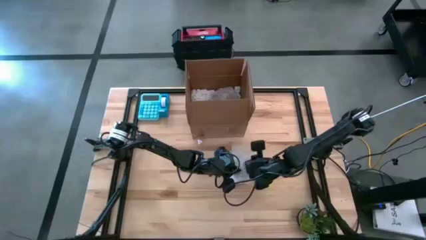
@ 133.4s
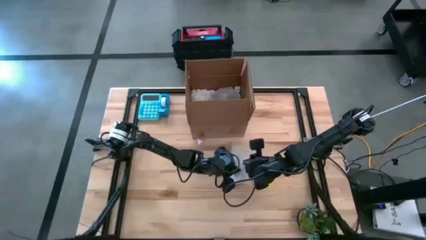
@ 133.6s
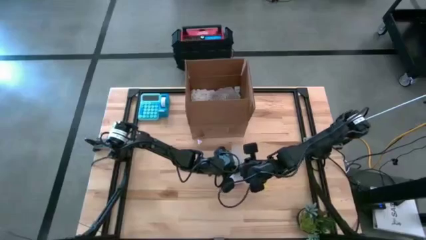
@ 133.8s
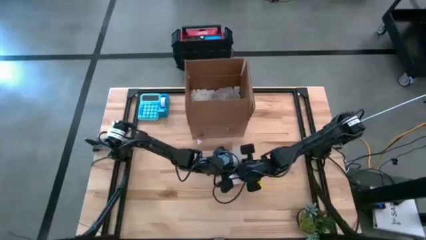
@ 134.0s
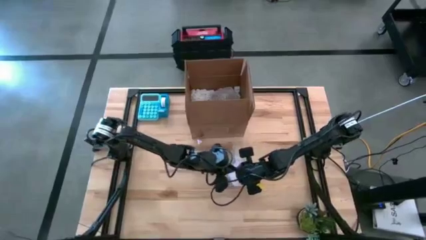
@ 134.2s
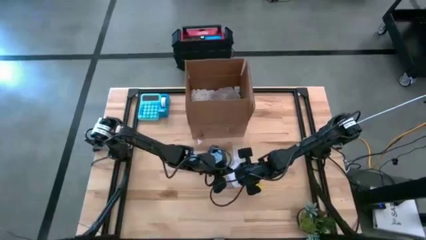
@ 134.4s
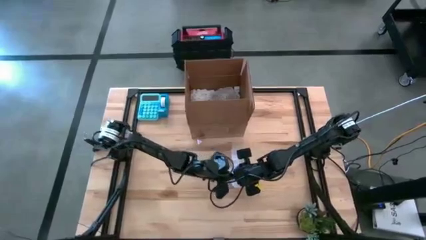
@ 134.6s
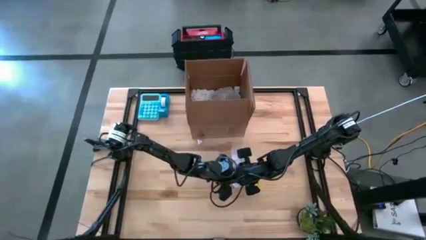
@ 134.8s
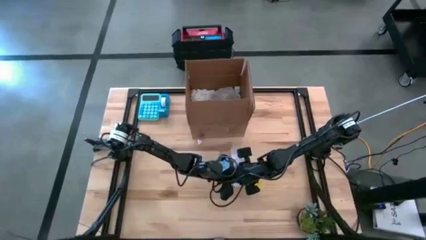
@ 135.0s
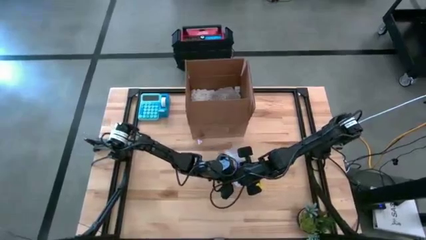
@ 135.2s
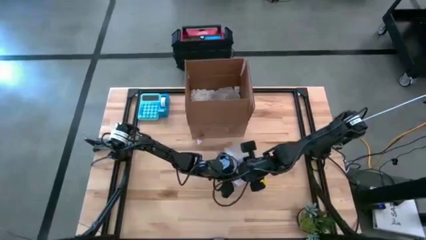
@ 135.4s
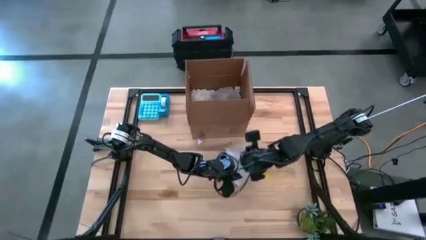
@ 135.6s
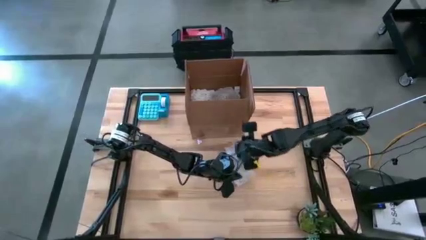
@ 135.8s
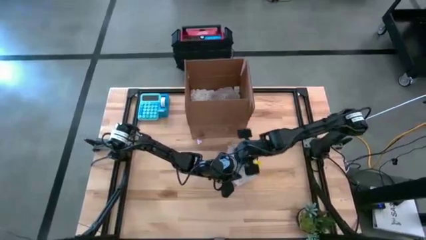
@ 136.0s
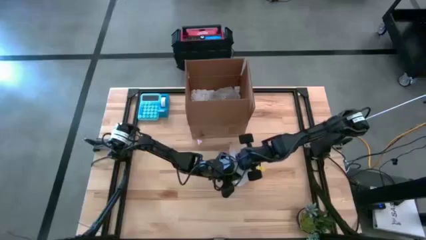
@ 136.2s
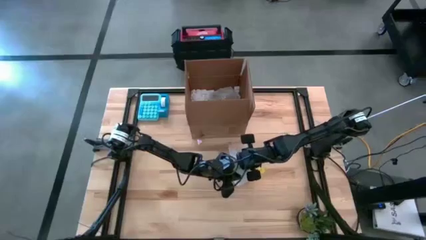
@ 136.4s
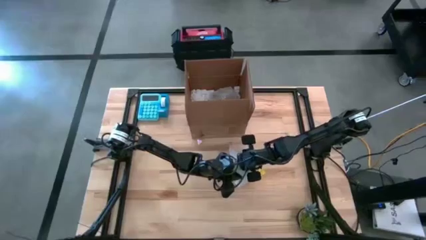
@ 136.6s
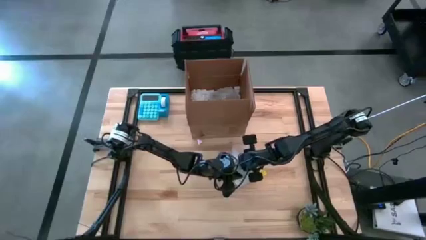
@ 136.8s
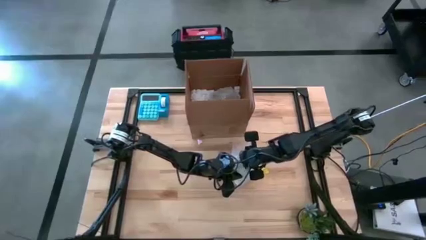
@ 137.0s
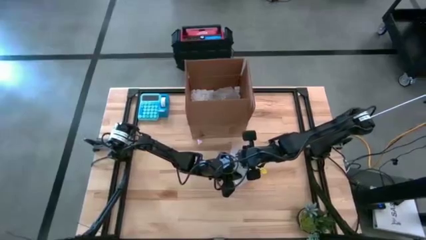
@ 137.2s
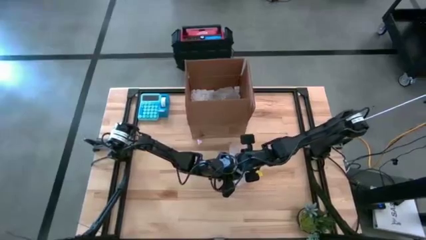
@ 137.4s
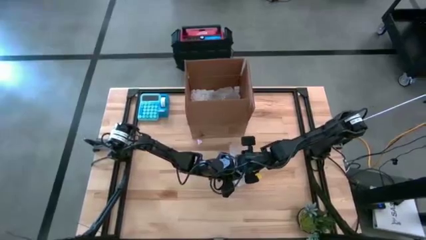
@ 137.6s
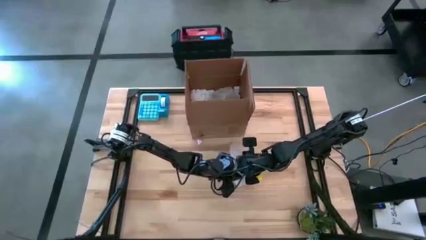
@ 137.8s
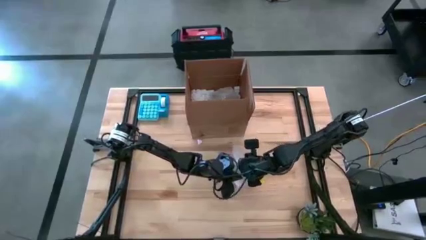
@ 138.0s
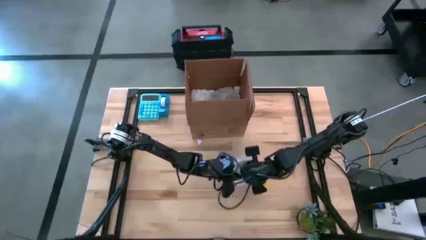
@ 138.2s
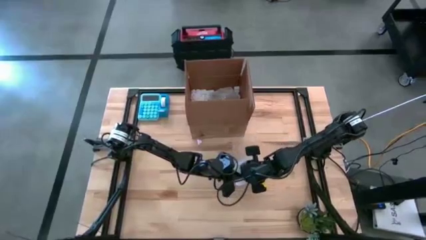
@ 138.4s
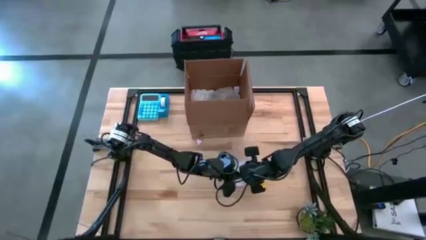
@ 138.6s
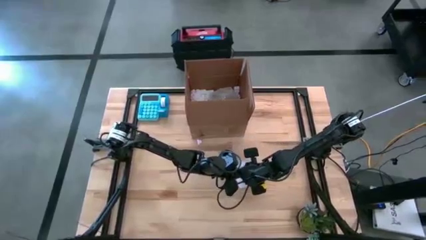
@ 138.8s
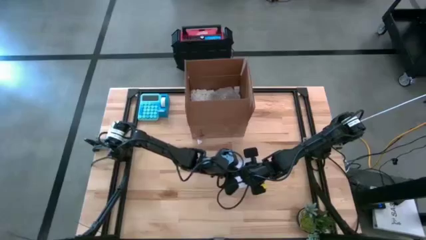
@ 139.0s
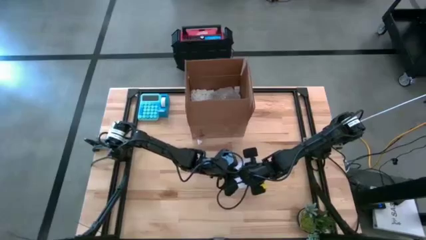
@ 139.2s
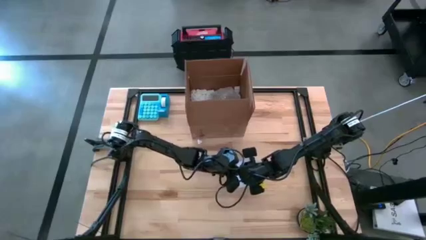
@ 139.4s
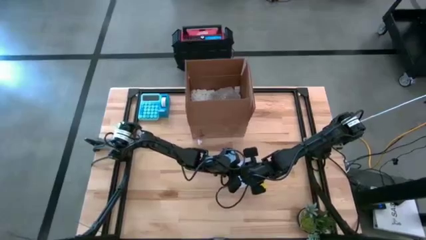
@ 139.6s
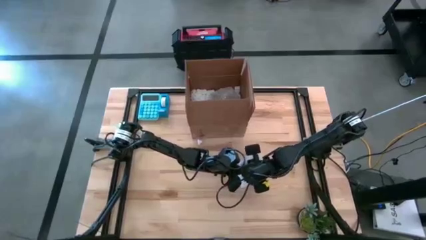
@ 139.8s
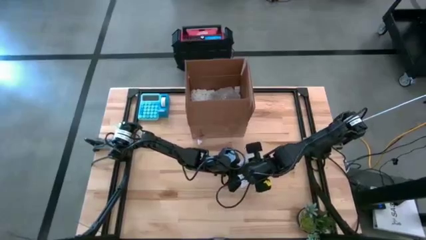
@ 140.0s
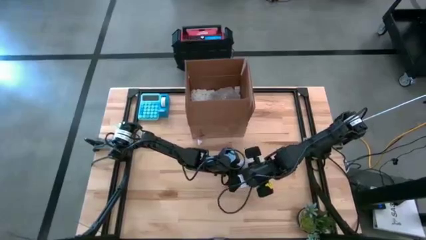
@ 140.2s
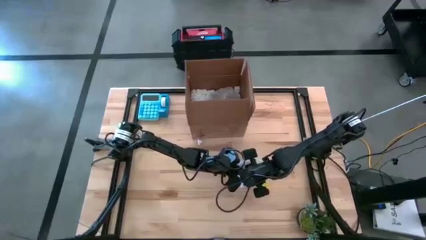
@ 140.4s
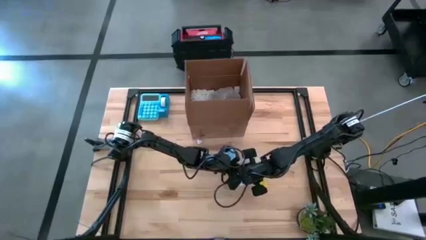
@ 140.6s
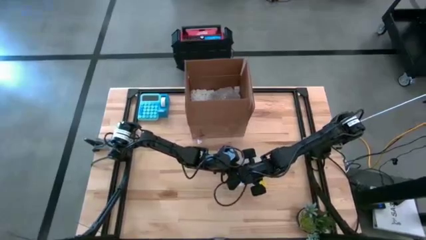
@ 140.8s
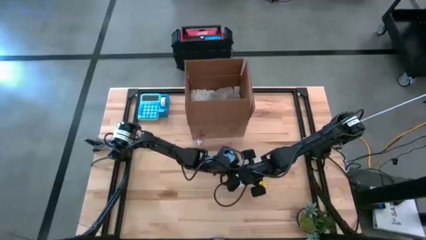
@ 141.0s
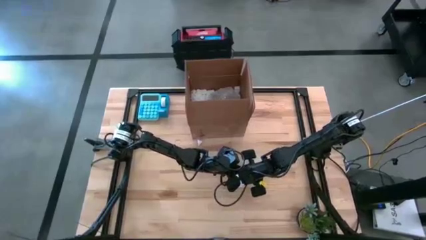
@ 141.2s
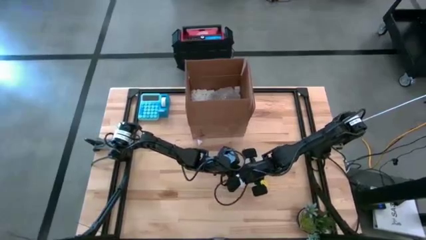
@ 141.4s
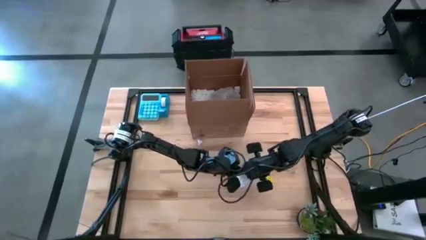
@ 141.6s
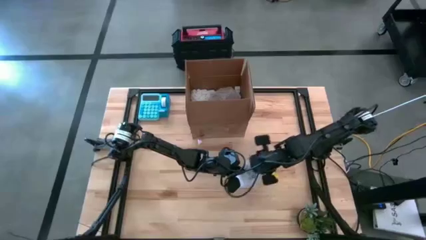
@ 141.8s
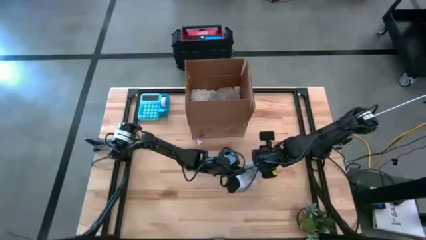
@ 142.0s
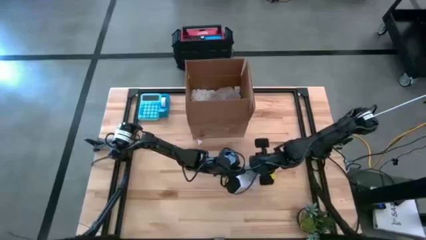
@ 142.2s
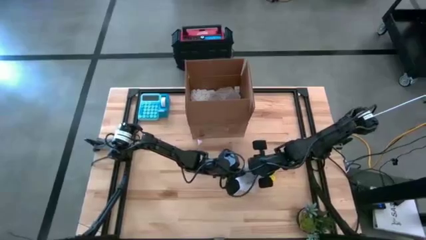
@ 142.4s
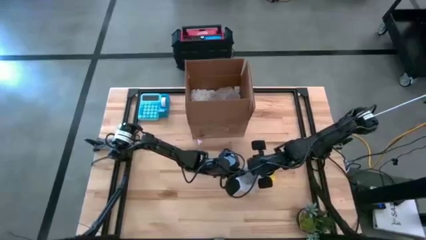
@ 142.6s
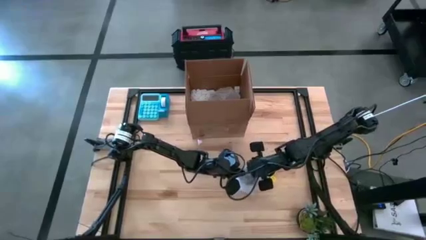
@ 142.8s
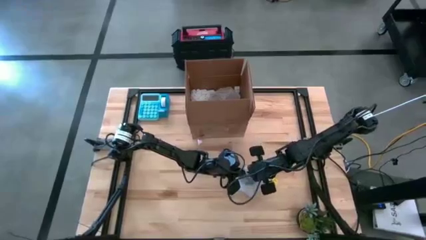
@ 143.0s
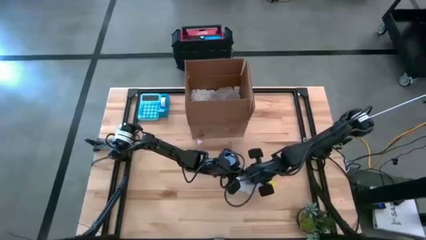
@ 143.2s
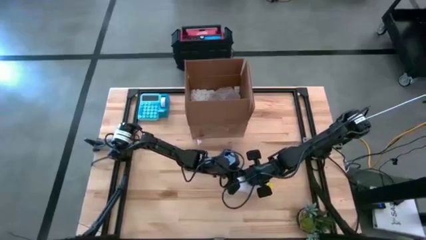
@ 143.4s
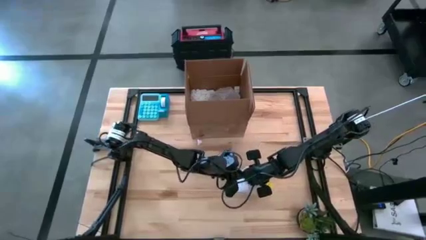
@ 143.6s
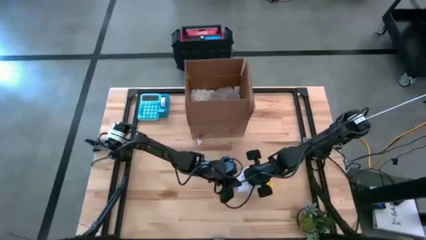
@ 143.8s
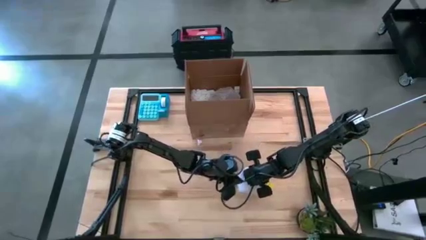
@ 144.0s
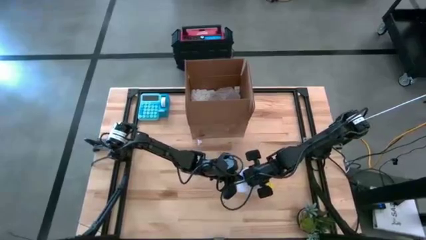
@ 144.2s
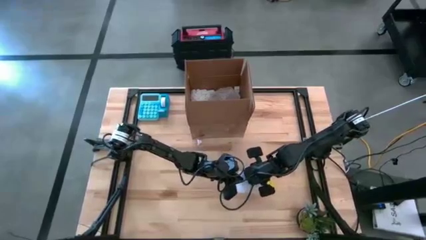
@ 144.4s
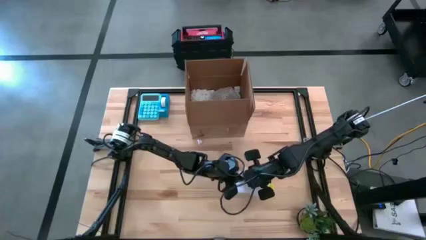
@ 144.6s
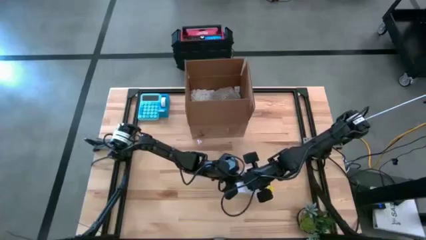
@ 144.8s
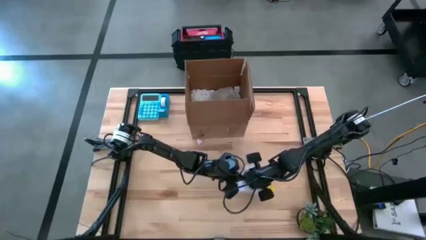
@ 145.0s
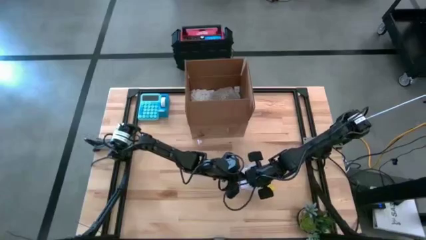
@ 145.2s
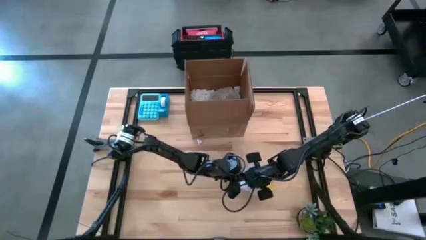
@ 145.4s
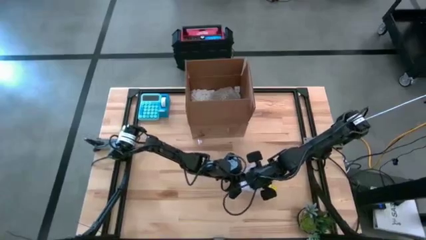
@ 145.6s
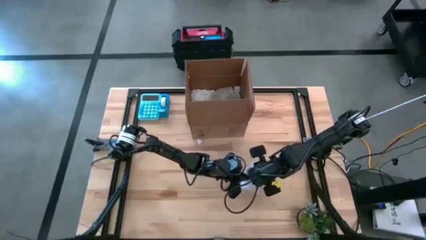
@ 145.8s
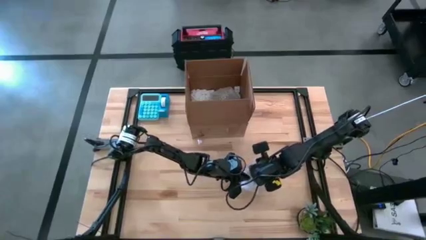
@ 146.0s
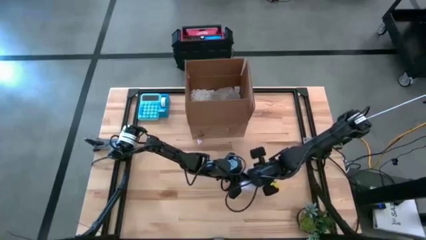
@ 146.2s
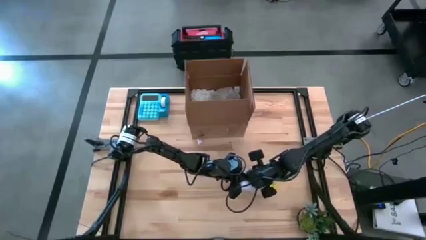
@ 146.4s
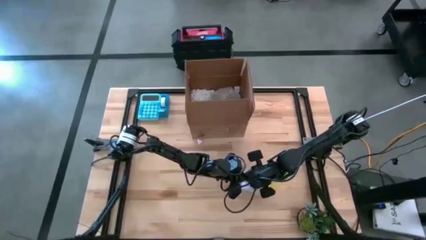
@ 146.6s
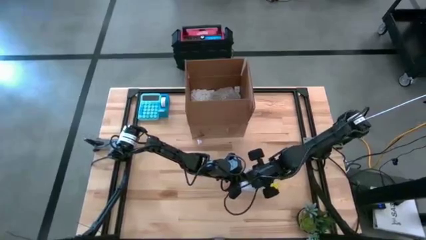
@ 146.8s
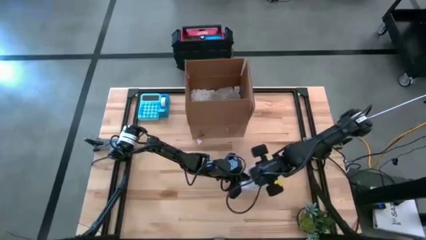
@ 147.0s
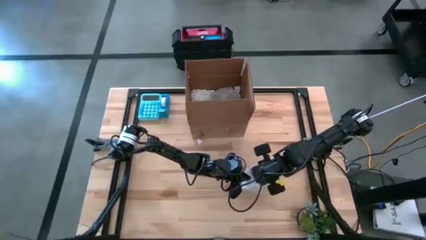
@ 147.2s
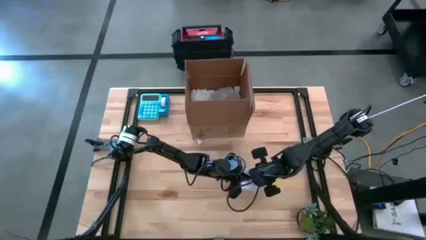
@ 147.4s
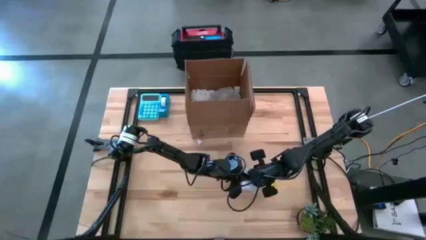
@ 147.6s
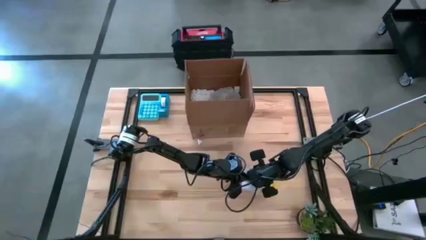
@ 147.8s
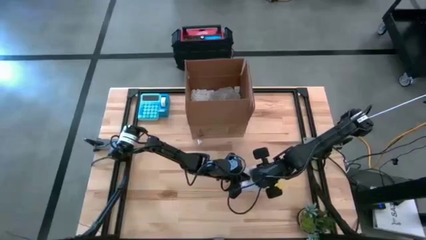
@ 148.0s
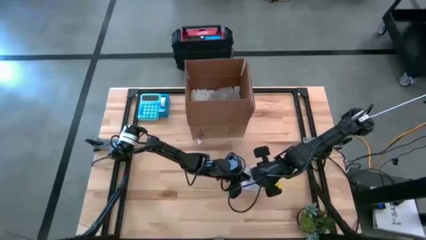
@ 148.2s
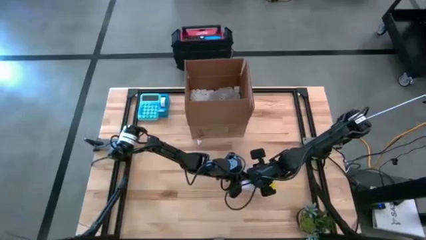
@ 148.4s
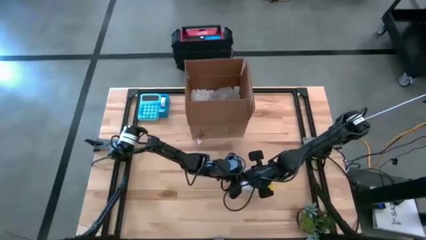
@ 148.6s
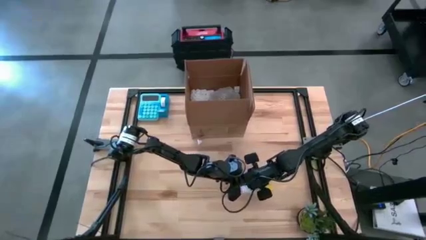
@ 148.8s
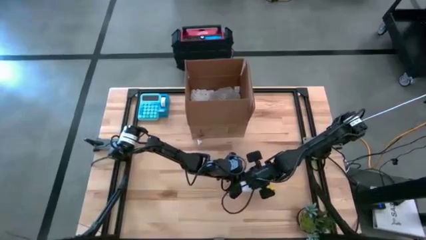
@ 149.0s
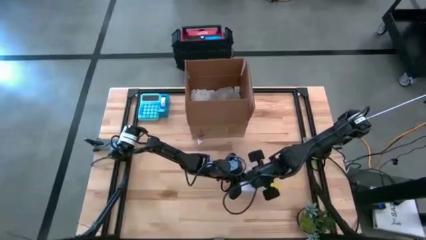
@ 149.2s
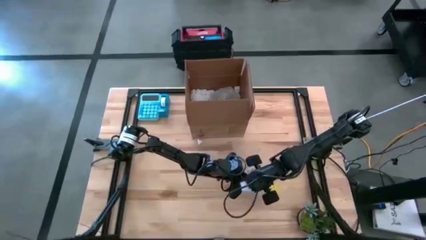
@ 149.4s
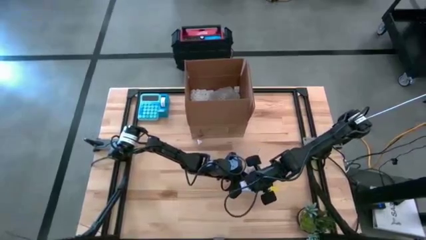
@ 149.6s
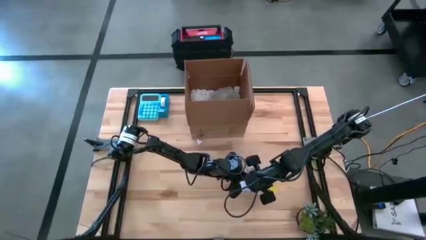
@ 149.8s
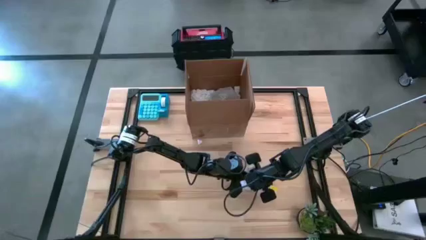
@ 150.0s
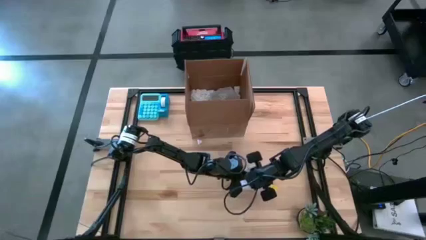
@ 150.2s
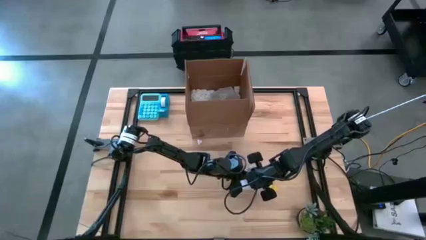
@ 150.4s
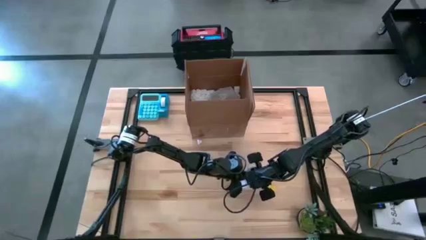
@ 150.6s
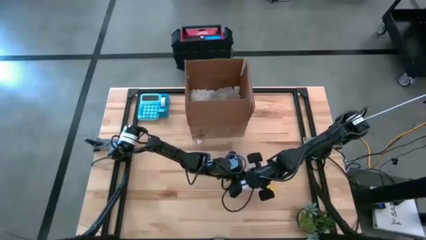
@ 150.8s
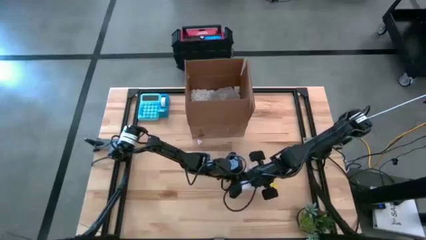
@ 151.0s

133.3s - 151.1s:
Task: wrap mug
Wrap the purple mug with bubble wrap
